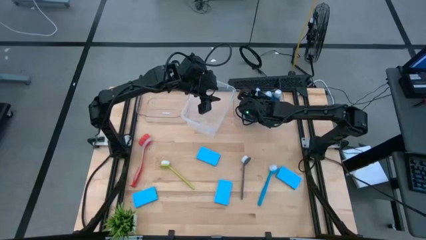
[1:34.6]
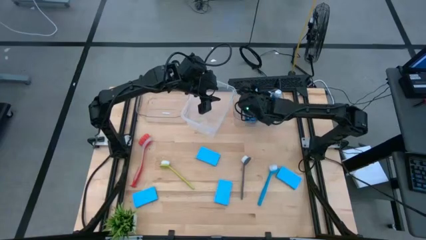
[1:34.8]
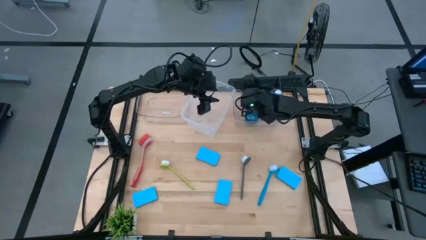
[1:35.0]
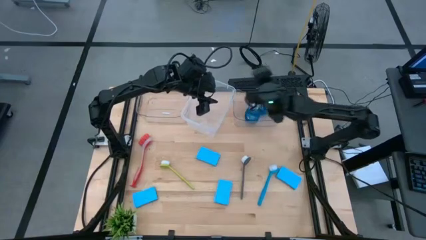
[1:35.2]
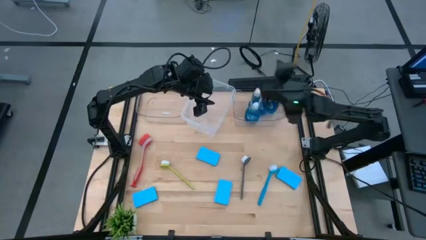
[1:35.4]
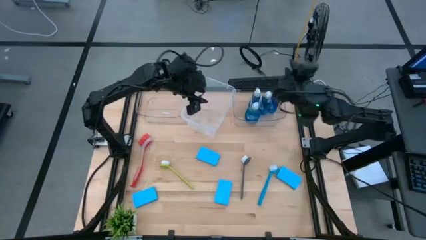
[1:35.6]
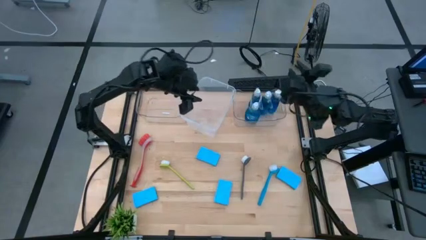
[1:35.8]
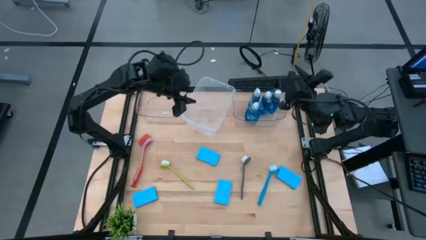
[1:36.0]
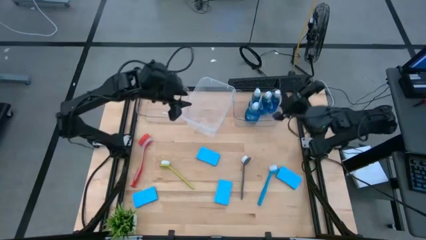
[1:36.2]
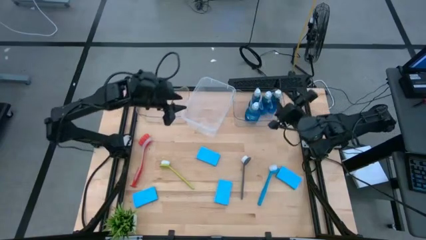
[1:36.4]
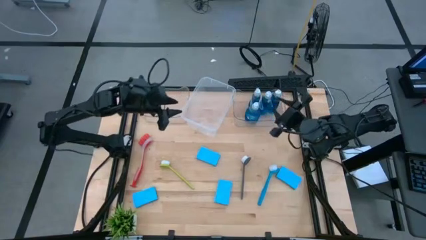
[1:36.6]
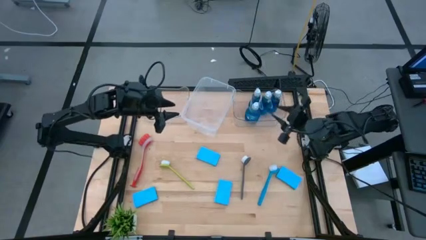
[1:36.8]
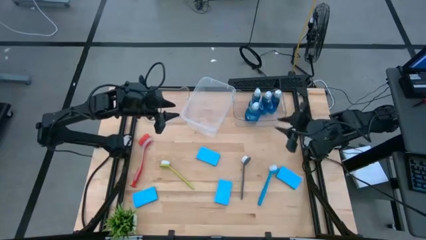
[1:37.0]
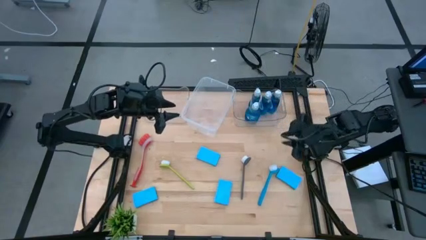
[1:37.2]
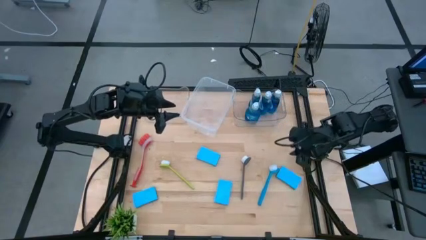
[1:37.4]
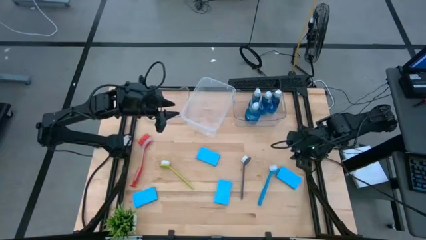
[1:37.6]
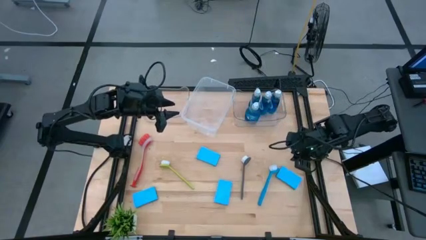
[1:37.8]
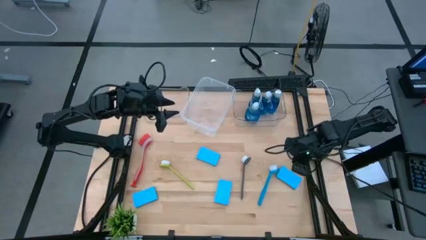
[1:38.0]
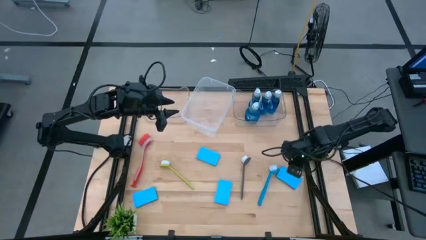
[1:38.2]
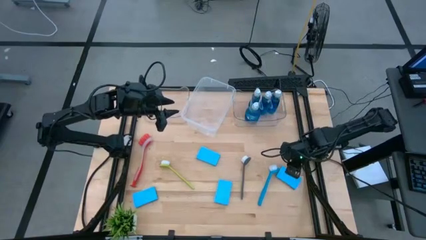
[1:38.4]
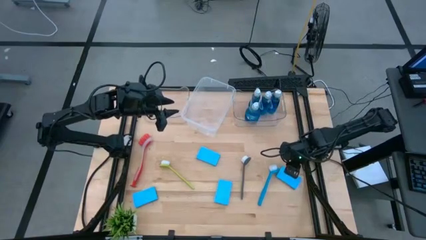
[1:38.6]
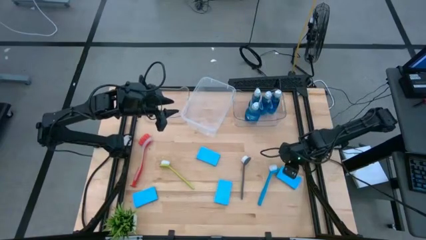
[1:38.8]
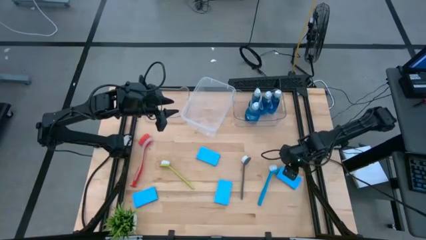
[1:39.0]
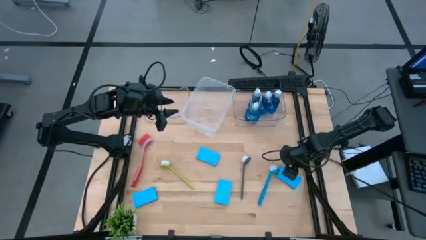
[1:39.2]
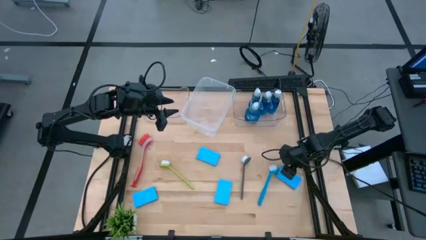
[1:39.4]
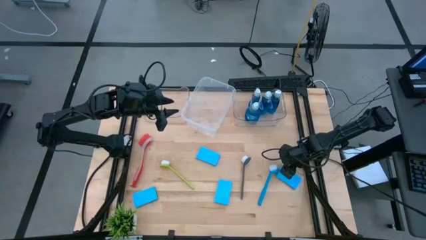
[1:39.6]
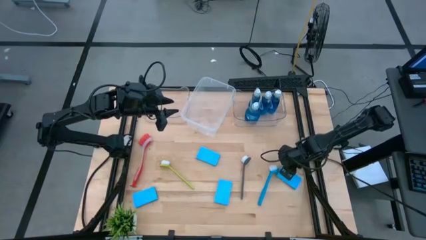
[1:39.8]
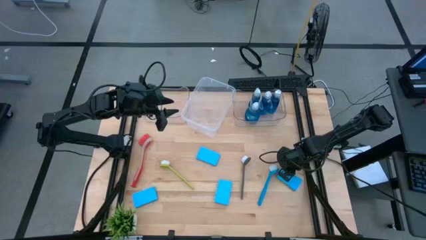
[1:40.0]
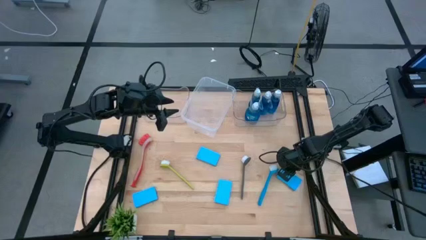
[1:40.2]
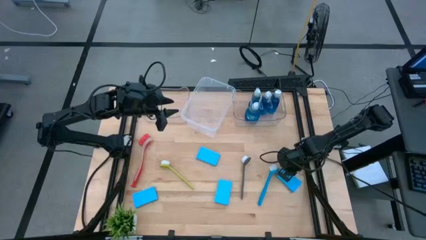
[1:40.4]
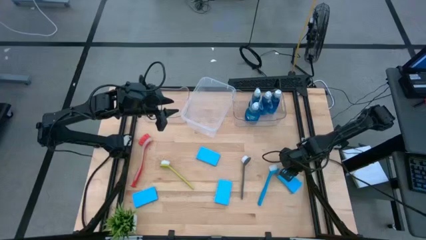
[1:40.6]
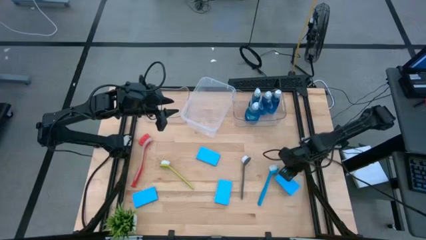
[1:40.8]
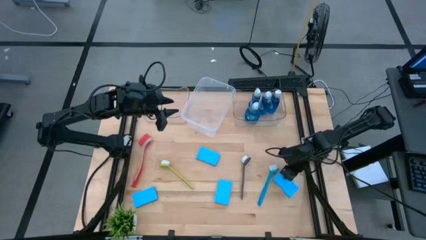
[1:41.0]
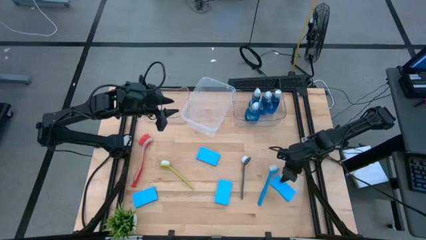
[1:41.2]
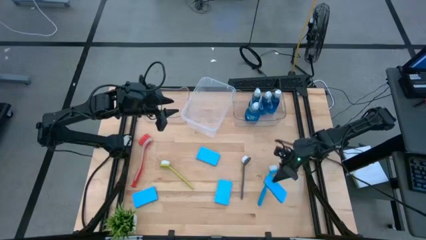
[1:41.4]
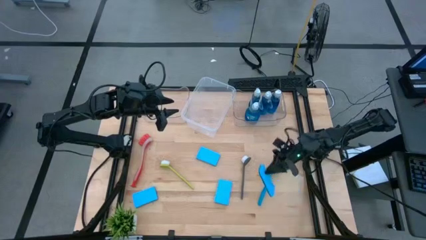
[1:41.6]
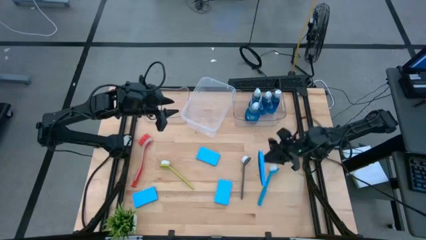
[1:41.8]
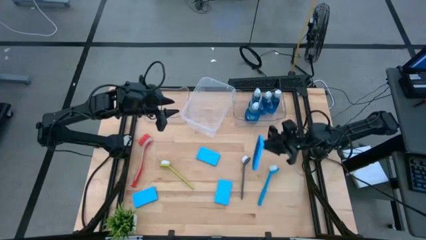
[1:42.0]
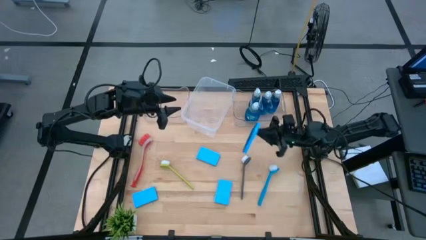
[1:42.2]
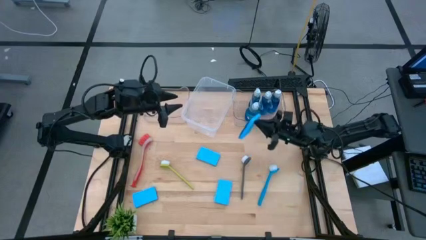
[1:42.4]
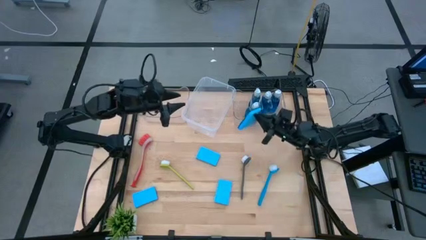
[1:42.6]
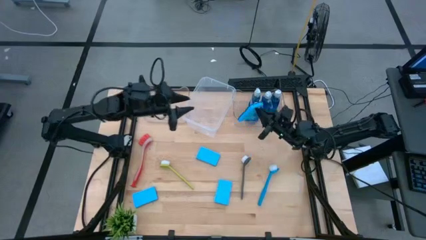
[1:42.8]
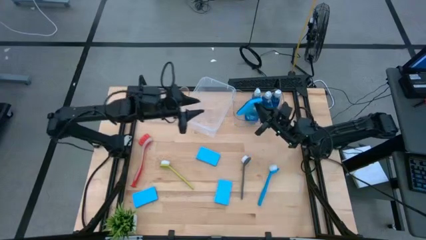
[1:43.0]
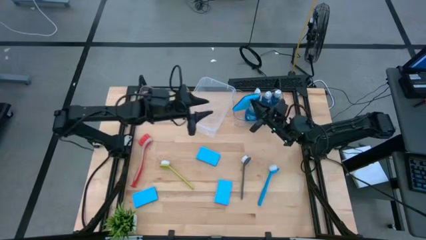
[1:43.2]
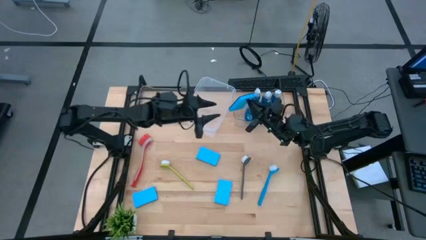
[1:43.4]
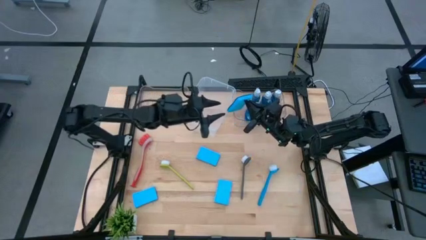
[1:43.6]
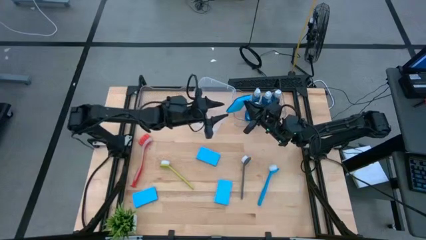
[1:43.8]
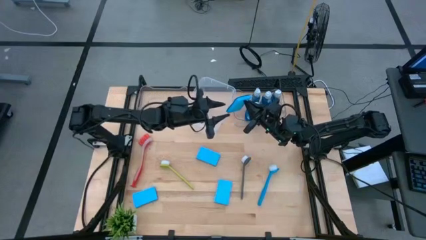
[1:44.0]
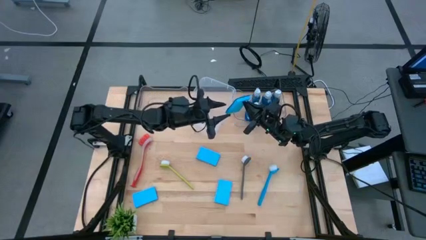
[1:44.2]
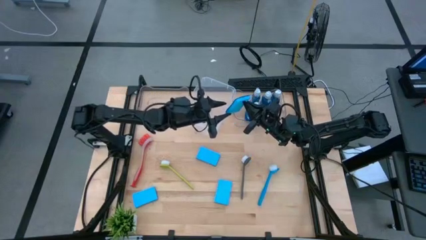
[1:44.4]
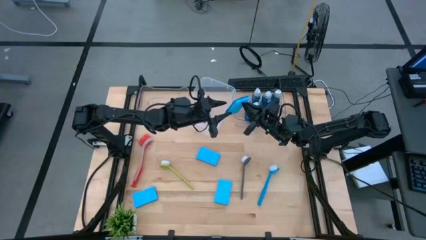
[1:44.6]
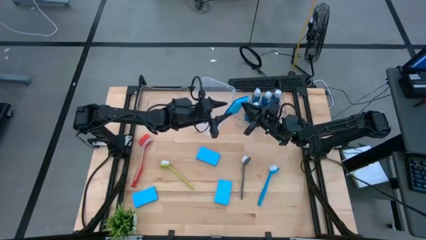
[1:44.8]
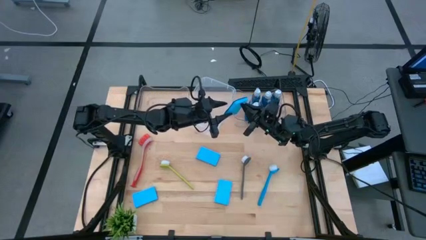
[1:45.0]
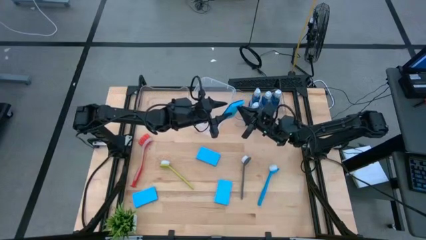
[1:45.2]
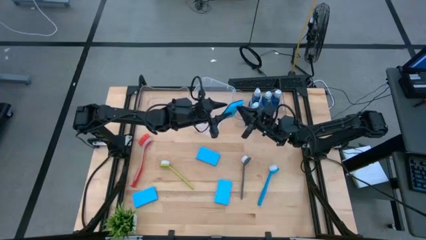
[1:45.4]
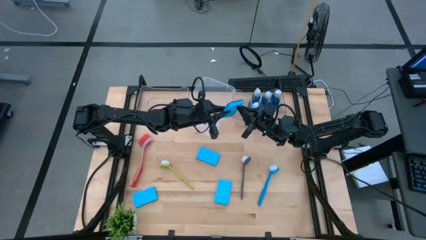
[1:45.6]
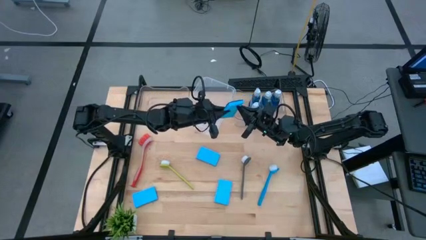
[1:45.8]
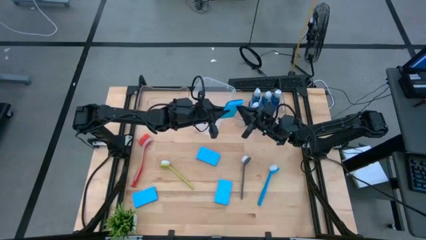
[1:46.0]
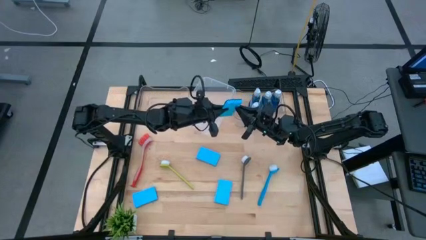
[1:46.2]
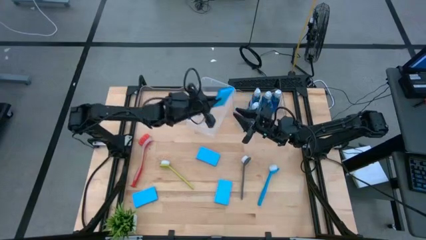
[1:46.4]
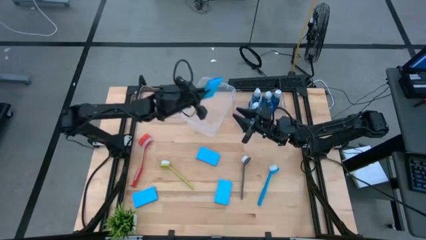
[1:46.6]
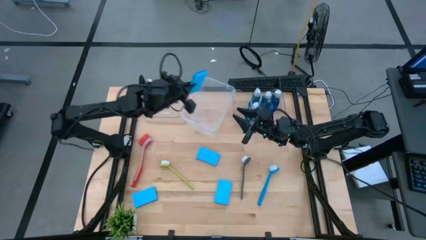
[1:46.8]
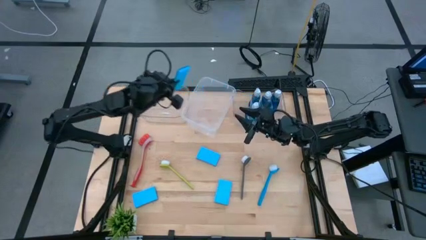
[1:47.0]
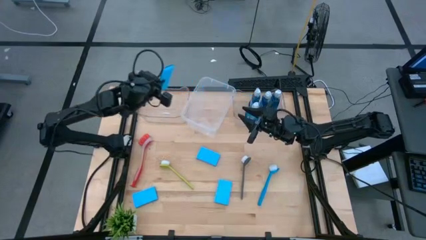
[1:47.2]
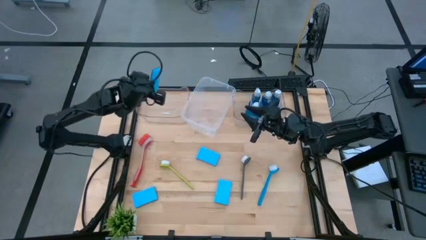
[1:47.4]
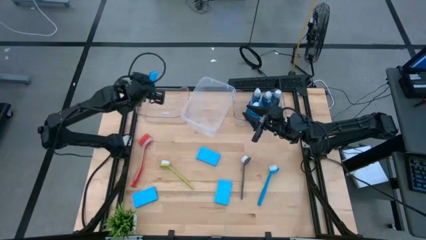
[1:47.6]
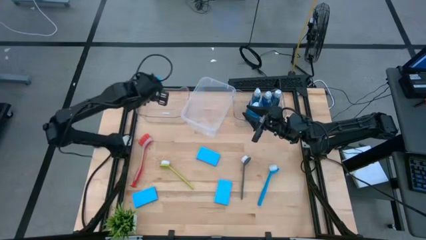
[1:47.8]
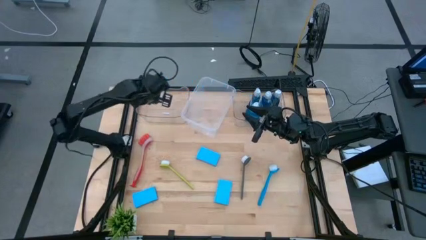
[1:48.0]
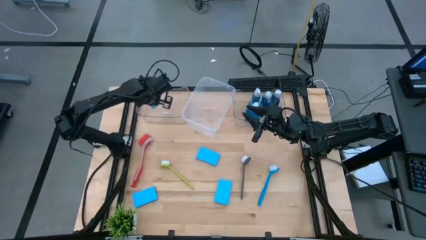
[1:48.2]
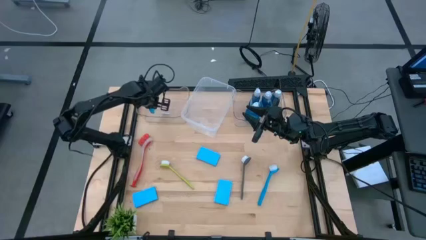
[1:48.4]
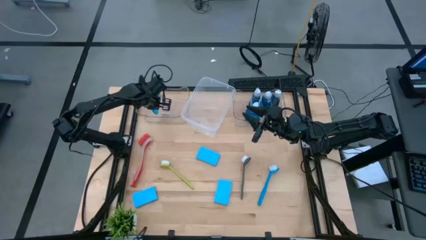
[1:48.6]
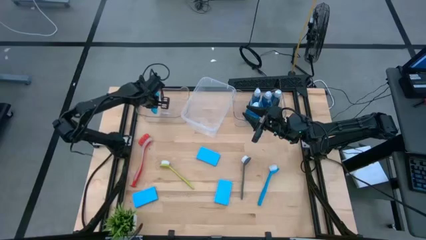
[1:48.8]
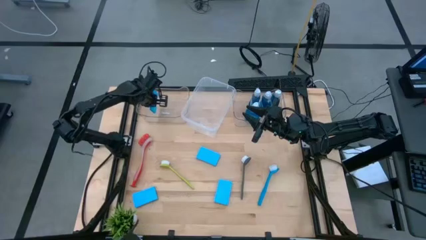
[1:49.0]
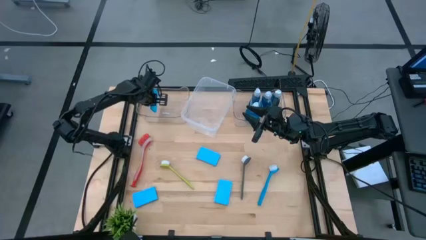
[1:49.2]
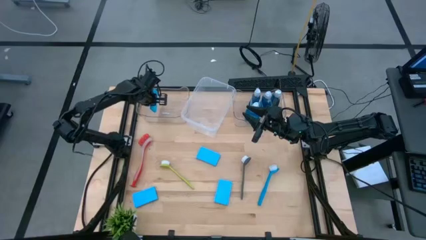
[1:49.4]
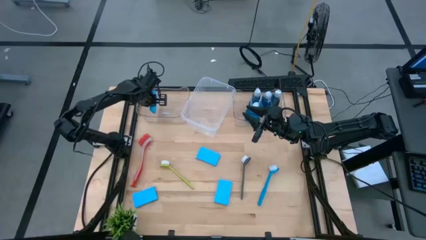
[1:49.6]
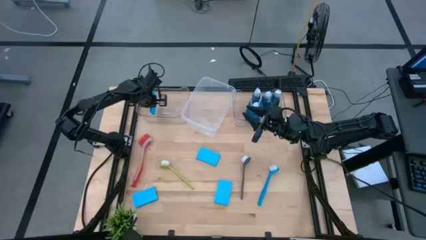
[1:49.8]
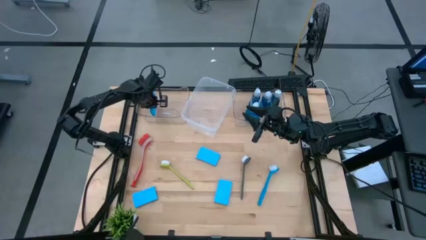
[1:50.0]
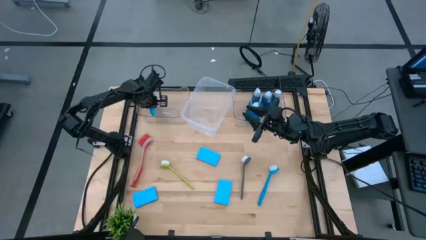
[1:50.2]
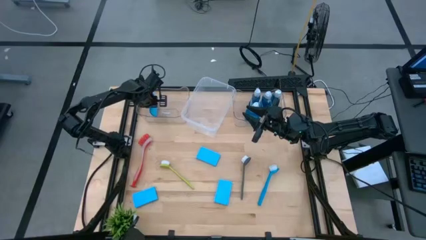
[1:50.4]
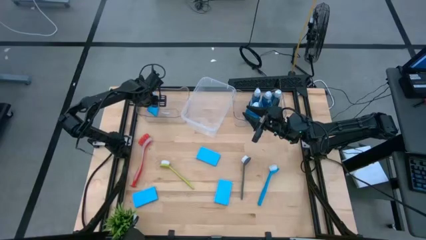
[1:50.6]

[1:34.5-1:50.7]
Task: Pick & Place Kitchen Sink Supplies
Put the blue sponge into the left transparent bin
